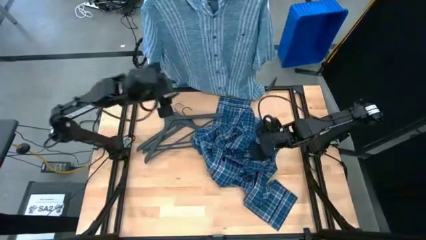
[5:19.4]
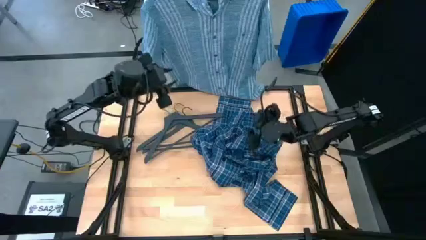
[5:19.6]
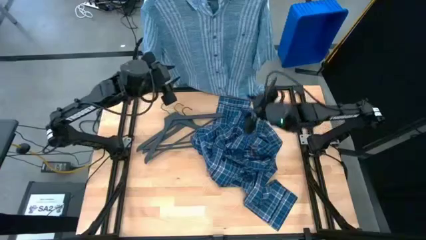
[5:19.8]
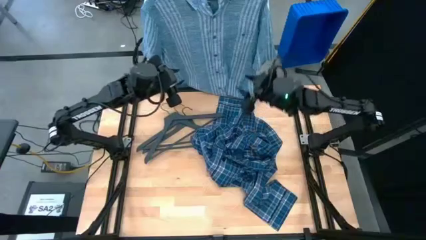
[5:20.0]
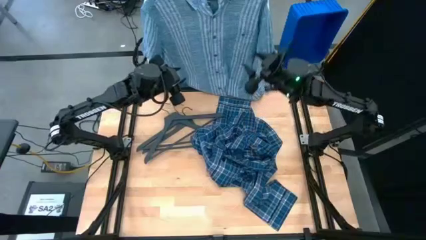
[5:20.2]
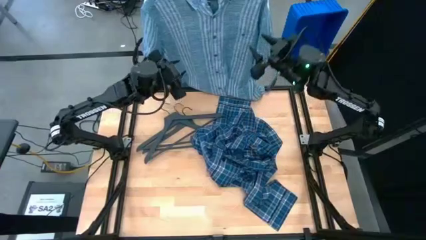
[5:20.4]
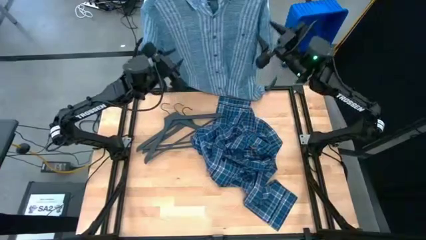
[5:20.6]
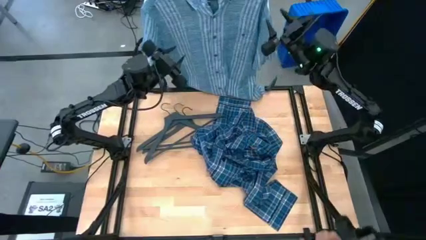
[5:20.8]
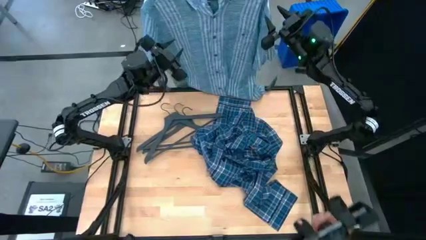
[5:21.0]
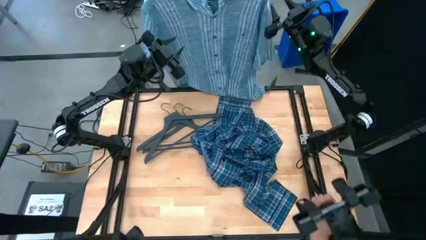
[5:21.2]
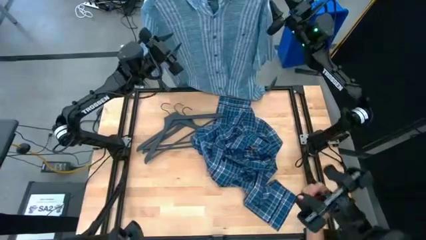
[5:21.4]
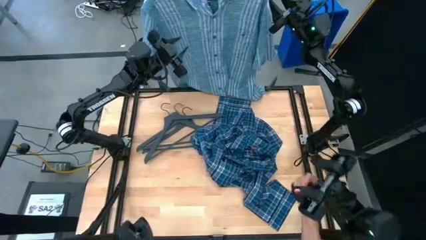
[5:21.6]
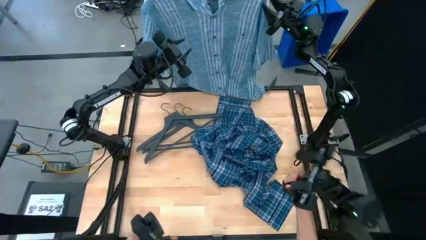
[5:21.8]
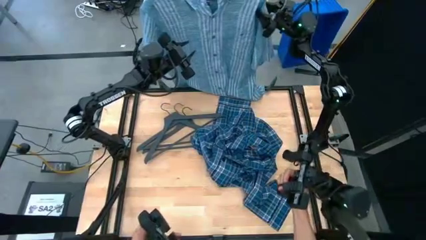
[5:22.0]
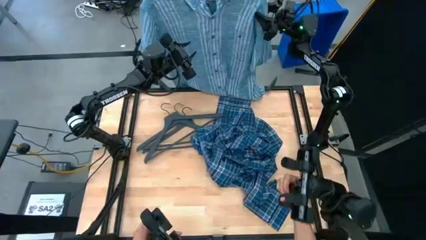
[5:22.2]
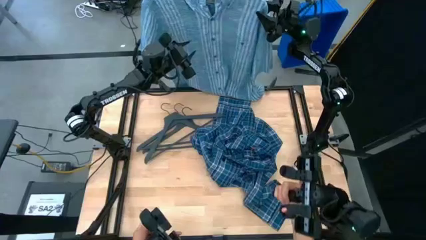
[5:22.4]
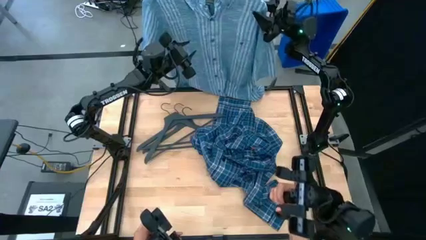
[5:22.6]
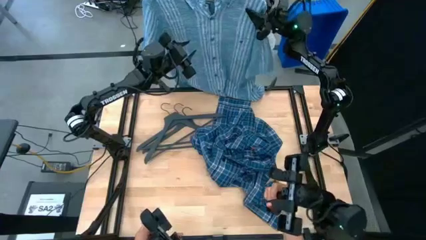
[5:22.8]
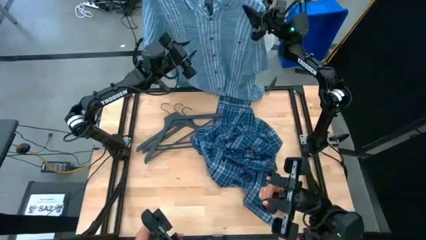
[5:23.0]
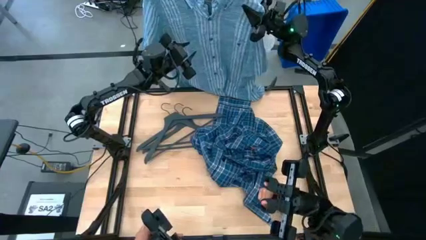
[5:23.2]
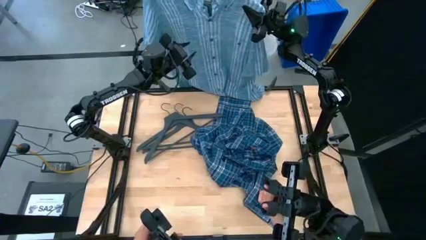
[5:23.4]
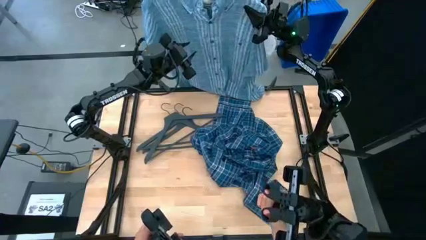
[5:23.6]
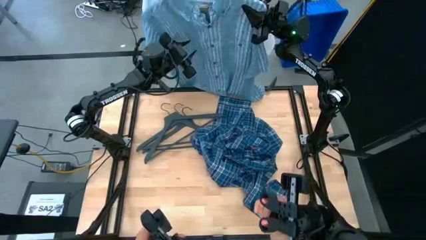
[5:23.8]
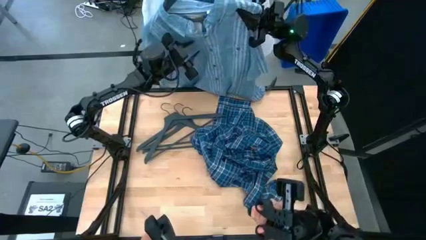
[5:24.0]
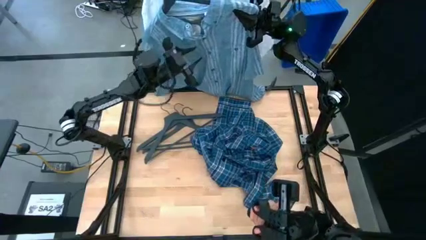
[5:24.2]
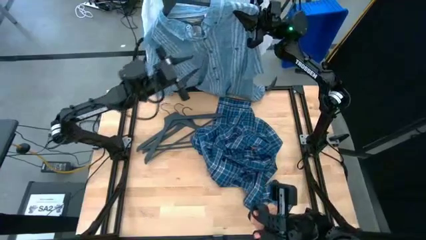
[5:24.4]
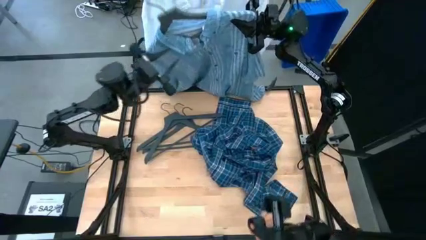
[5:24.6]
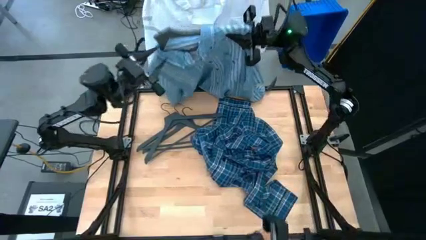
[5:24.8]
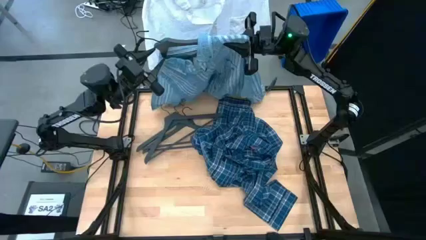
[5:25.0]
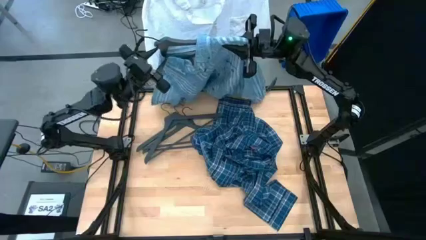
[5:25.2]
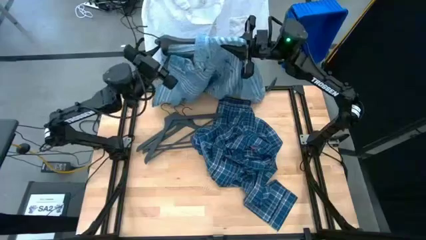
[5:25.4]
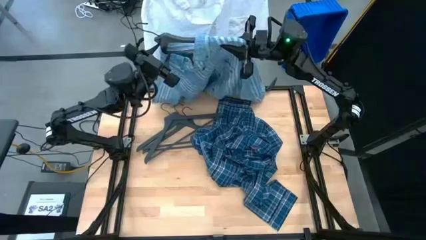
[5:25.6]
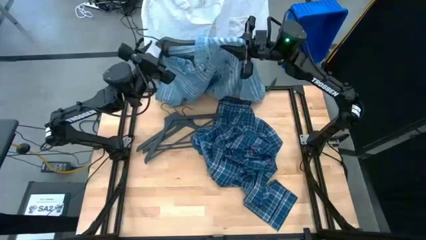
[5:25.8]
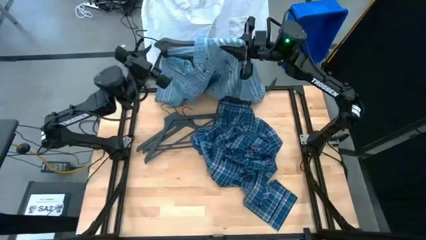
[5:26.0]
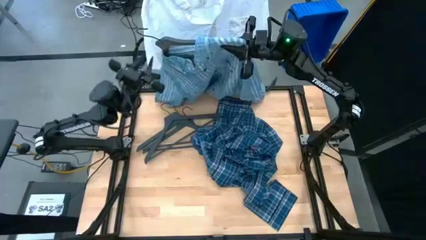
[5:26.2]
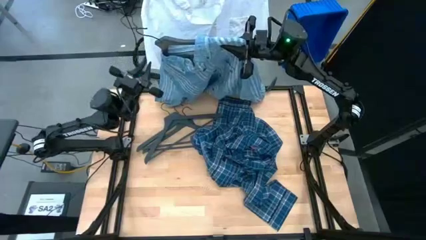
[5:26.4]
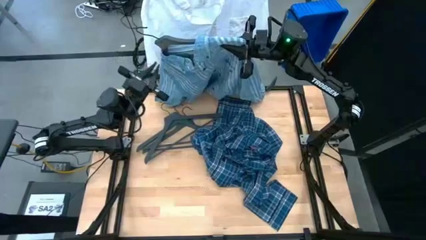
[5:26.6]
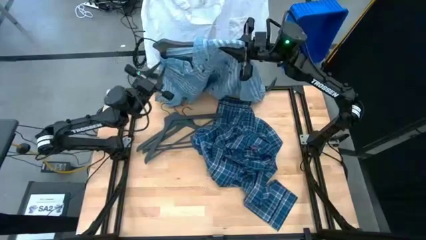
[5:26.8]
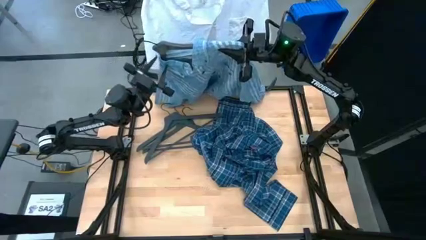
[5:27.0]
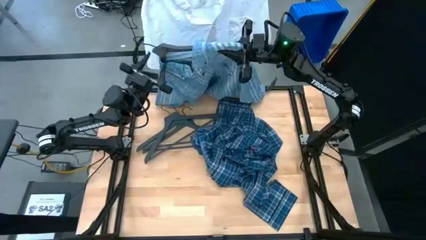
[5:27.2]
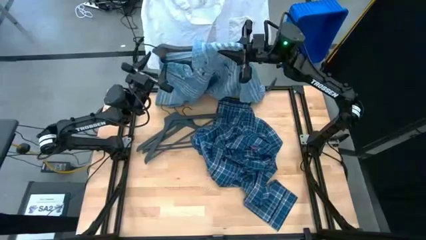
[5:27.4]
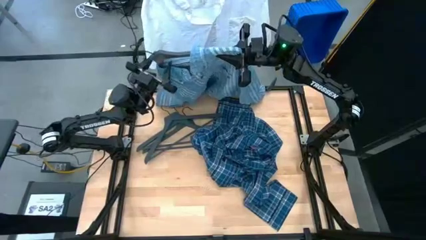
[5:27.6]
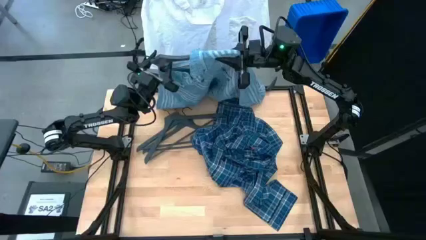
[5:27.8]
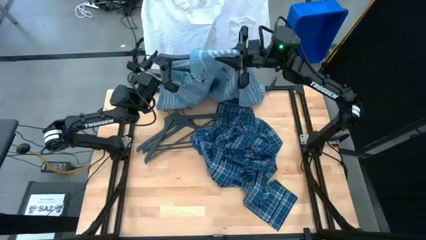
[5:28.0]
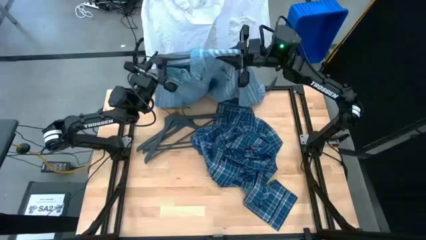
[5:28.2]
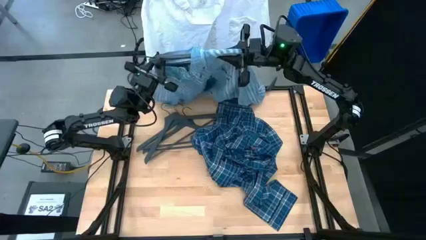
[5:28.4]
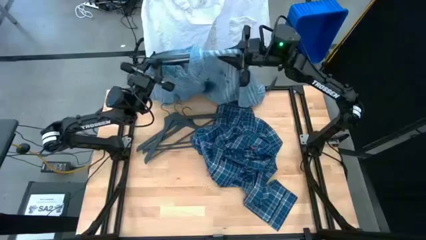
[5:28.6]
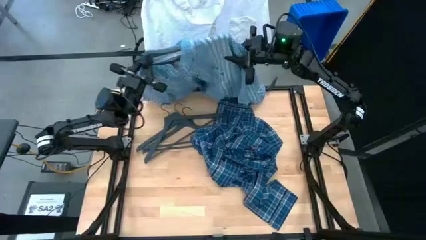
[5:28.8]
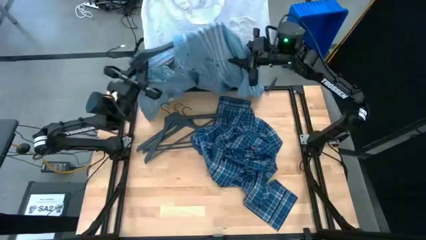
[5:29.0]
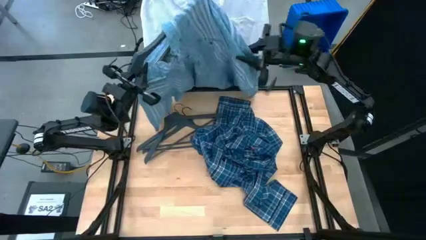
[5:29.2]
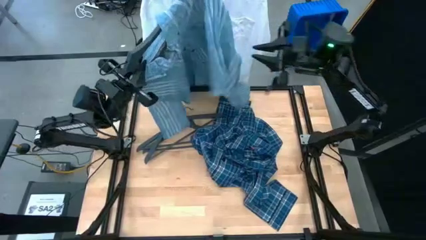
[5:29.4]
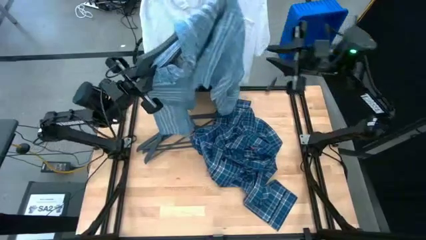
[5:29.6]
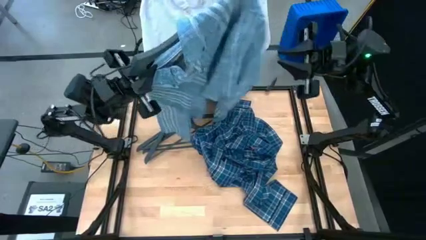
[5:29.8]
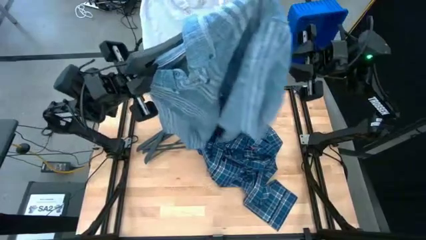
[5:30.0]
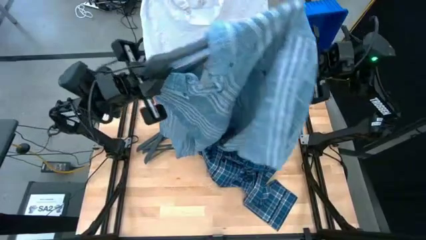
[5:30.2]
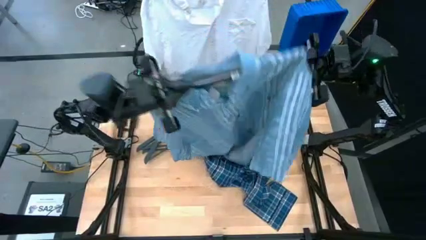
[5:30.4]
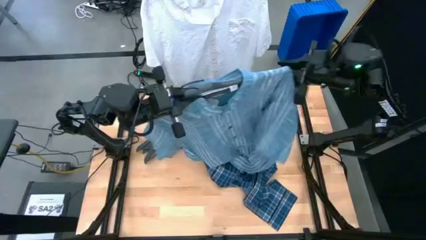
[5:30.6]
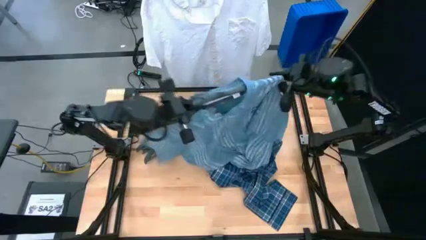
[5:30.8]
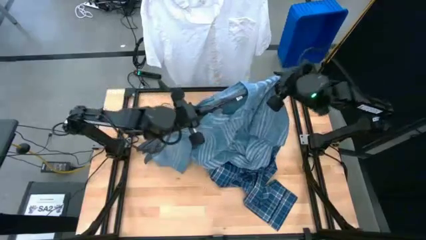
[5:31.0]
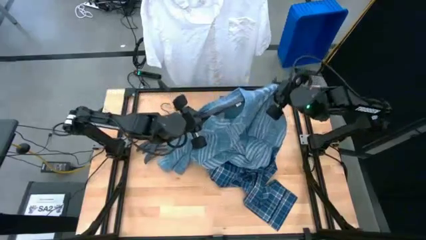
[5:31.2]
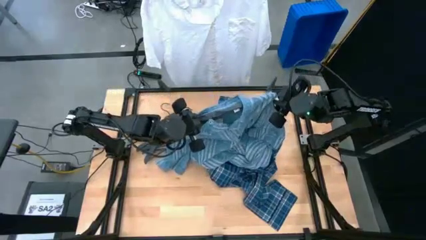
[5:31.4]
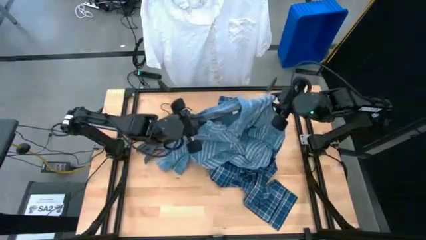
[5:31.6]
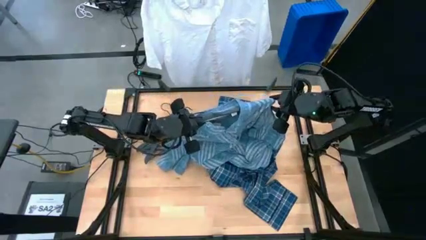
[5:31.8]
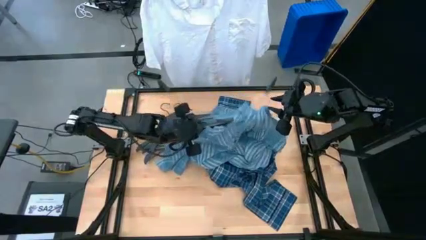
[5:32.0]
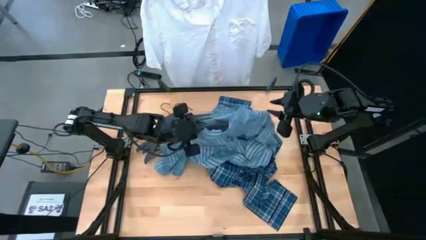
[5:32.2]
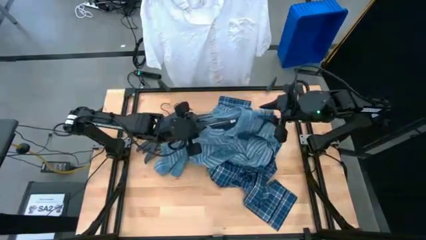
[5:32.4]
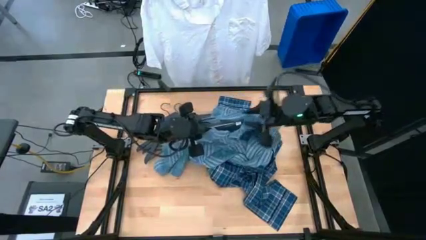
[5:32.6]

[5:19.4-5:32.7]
Task: Hang clothes
Unhang the green shirt from the hanging rack

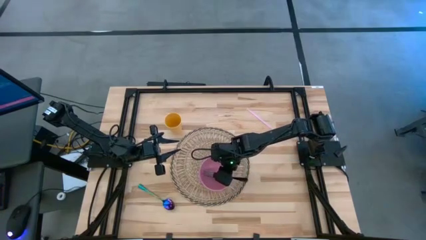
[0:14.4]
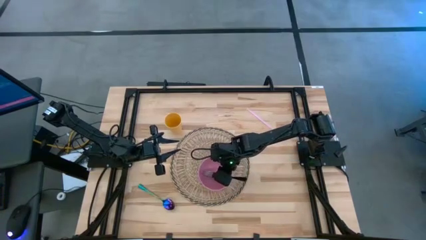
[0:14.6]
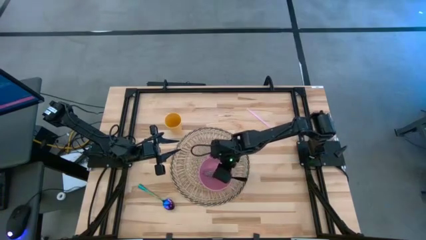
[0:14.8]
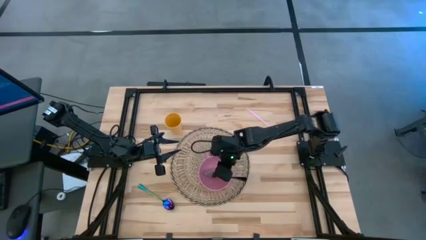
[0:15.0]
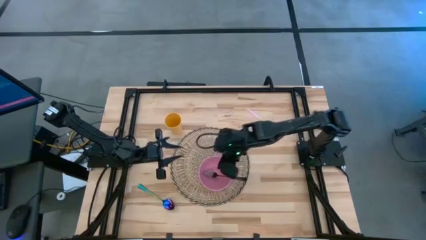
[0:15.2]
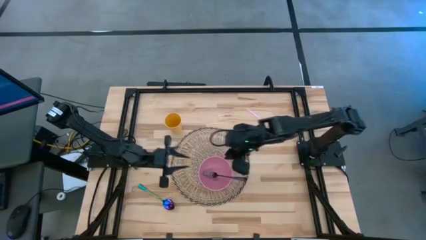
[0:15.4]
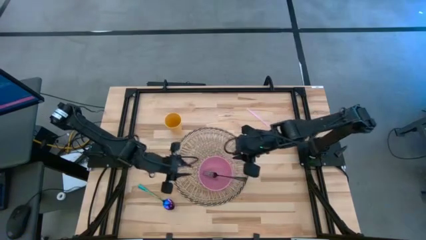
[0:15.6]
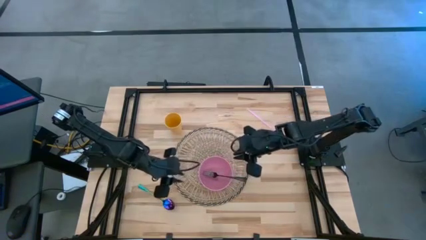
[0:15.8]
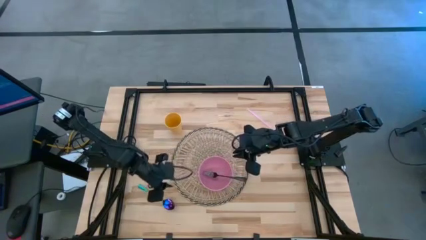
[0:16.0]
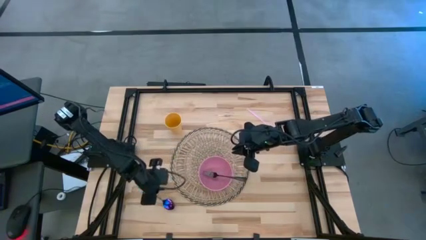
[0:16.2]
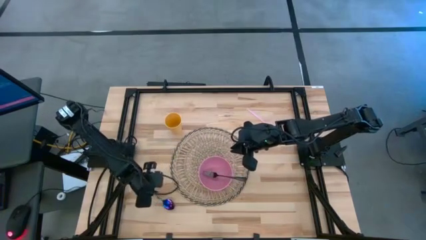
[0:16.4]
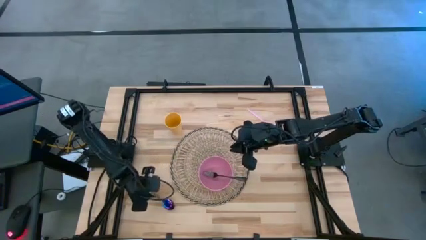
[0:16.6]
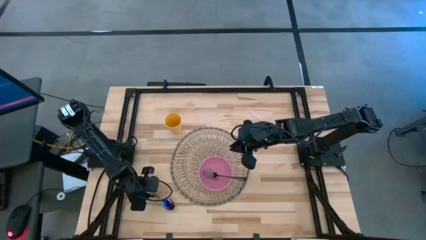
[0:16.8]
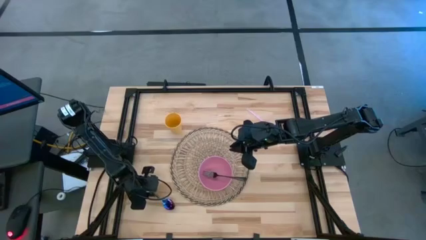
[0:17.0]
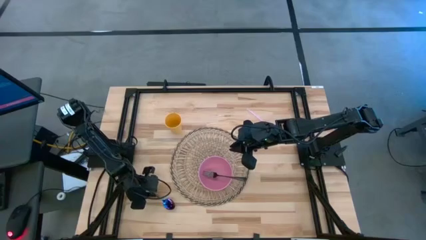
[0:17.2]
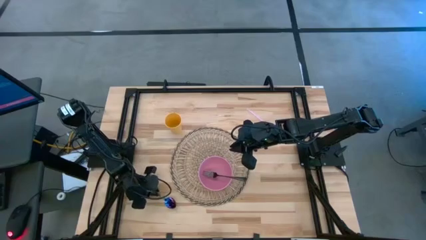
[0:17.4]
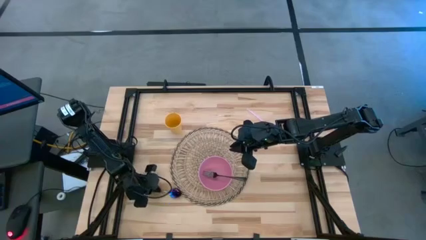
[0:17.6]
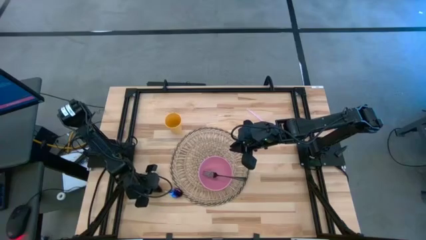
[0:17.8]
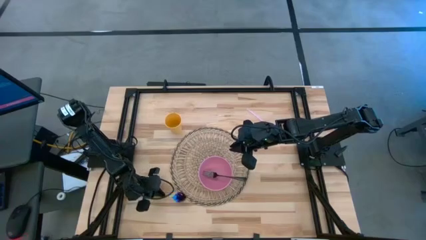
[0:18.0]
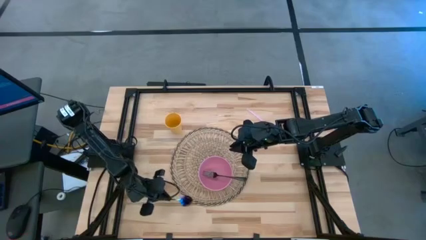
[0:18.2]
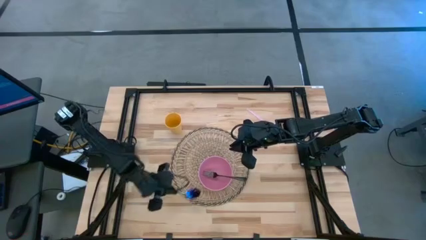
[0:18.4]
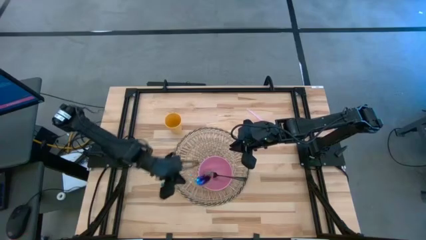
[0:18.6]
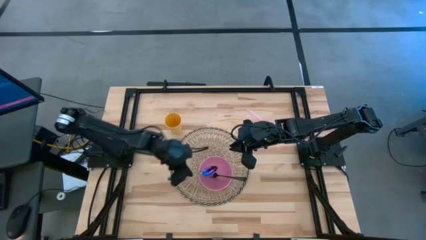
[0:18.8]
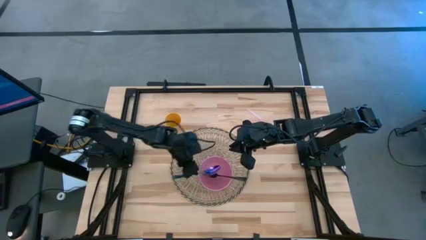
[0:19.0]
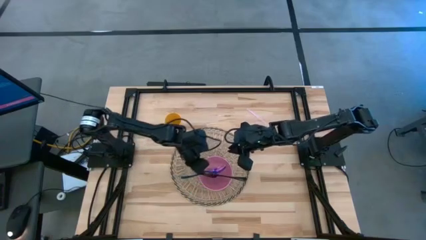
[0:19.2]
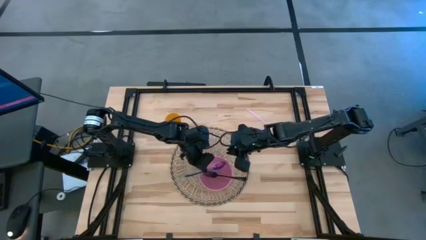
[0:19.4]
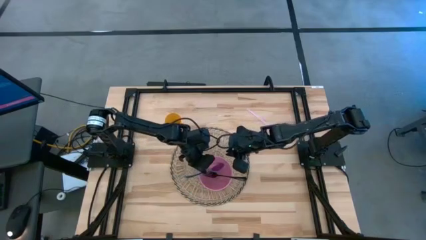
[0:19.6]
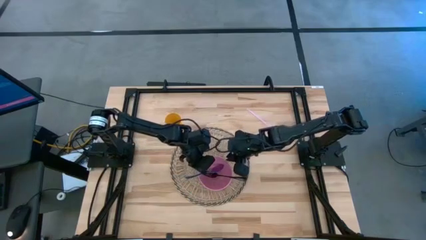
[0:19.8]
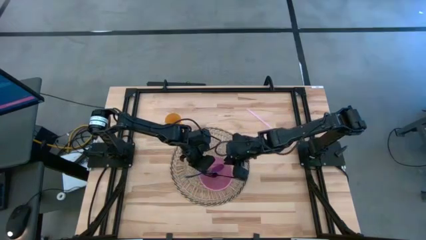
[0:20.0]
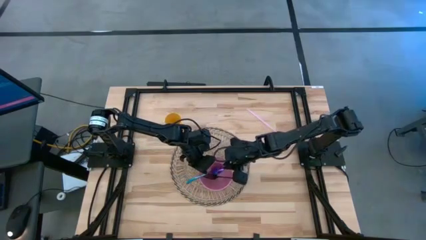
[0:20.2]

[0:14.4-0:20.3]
Task: Pick & Place Utensil
Put the blue spoon into the pink bowl on the brown mat
